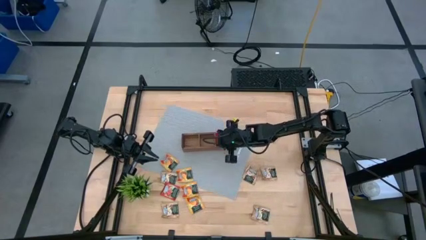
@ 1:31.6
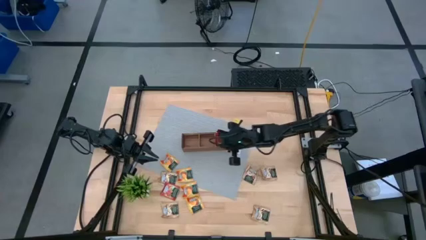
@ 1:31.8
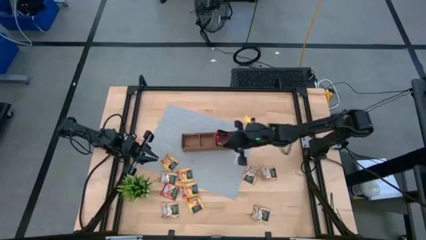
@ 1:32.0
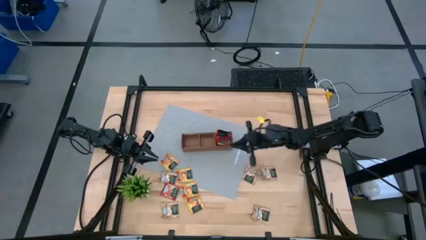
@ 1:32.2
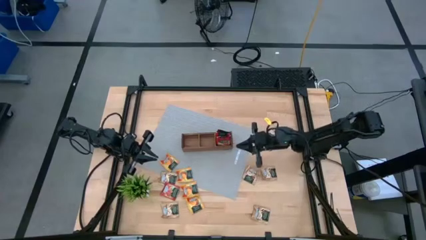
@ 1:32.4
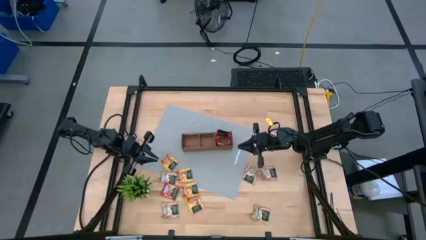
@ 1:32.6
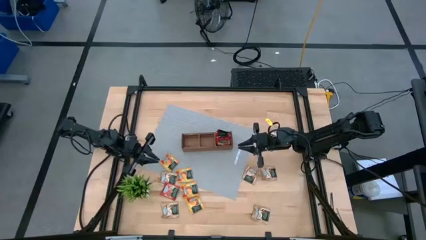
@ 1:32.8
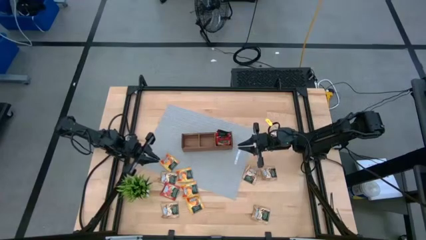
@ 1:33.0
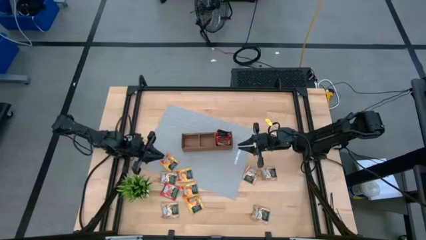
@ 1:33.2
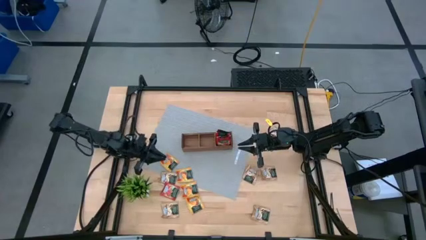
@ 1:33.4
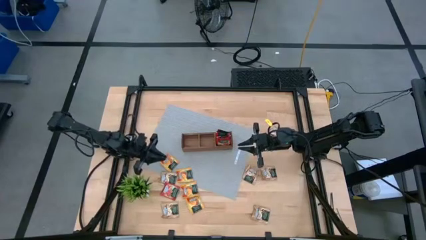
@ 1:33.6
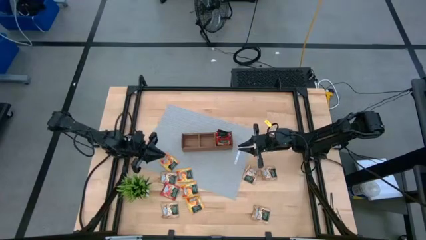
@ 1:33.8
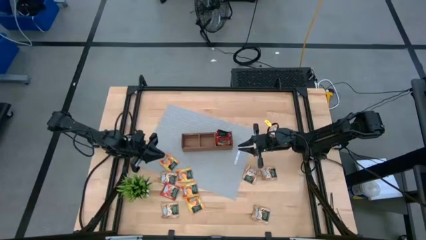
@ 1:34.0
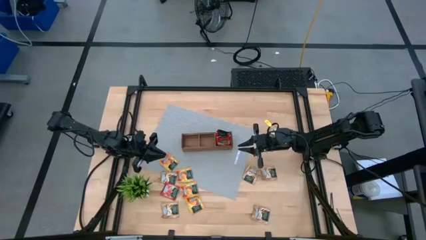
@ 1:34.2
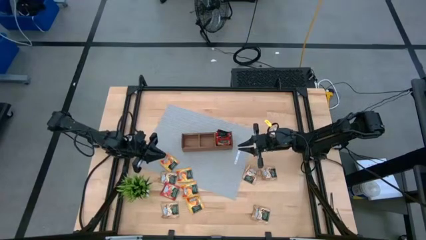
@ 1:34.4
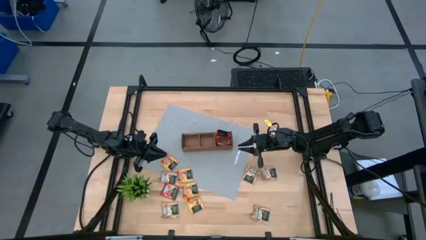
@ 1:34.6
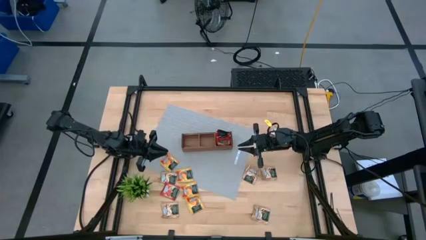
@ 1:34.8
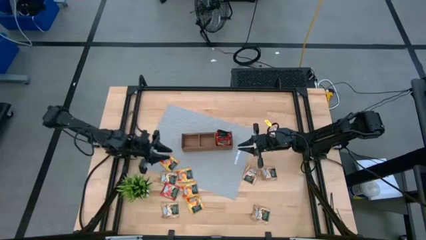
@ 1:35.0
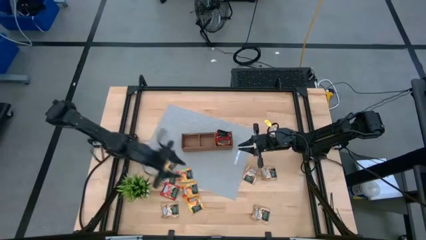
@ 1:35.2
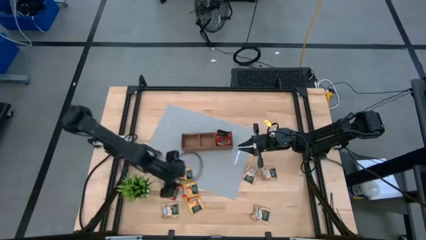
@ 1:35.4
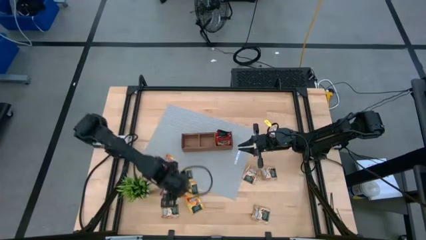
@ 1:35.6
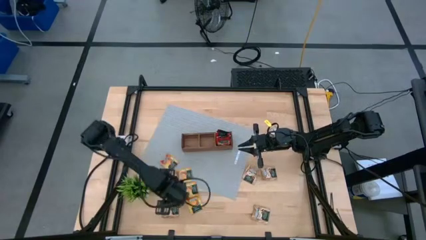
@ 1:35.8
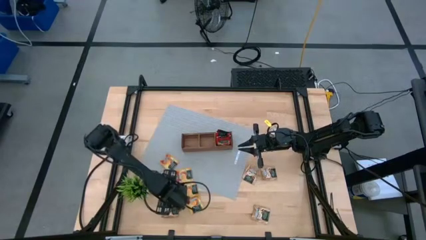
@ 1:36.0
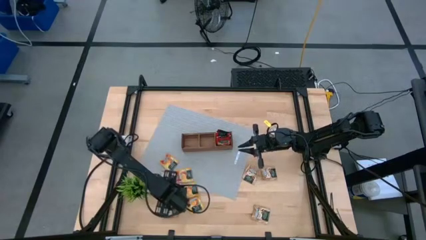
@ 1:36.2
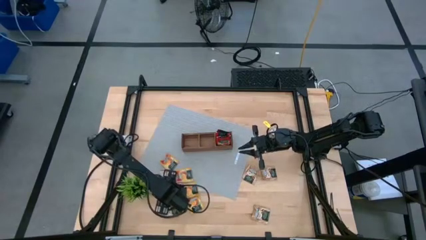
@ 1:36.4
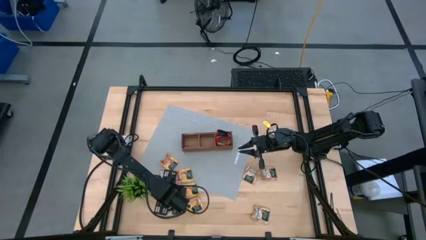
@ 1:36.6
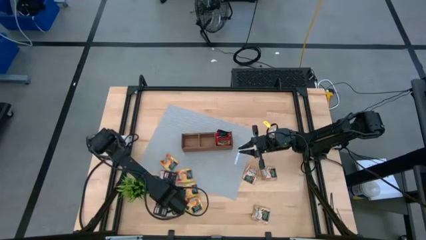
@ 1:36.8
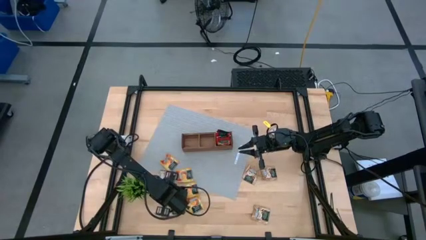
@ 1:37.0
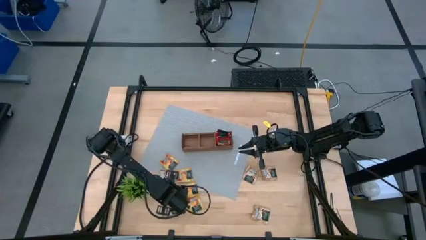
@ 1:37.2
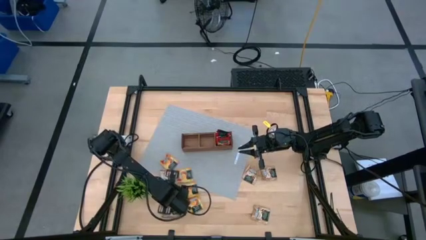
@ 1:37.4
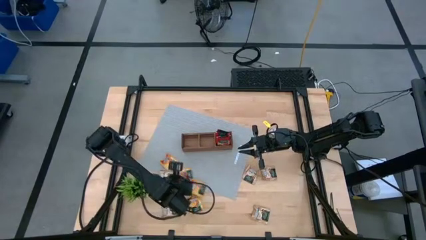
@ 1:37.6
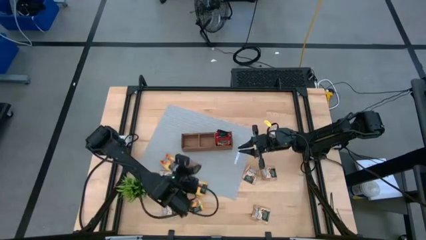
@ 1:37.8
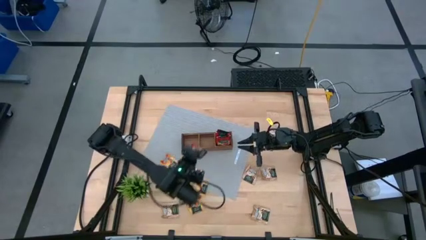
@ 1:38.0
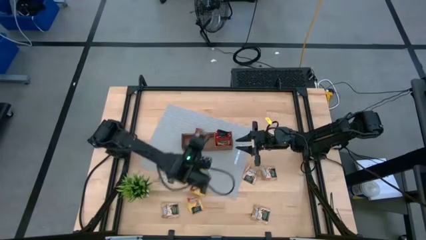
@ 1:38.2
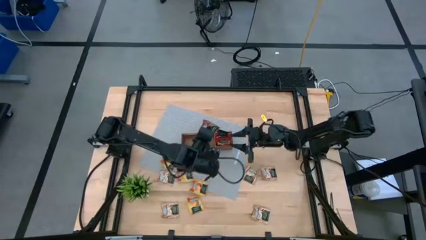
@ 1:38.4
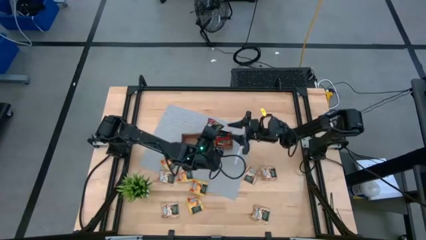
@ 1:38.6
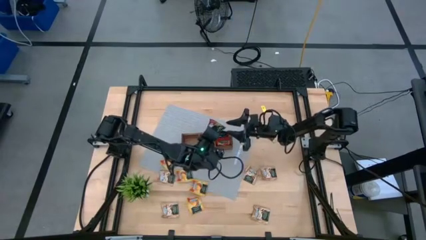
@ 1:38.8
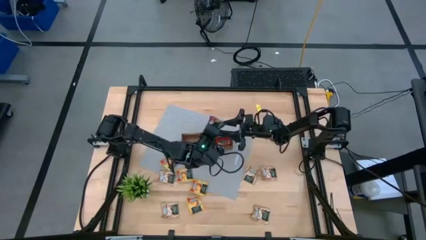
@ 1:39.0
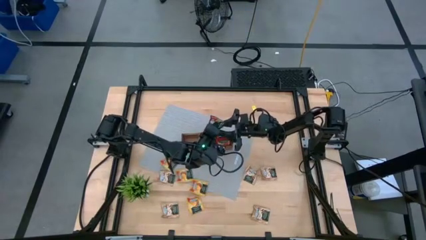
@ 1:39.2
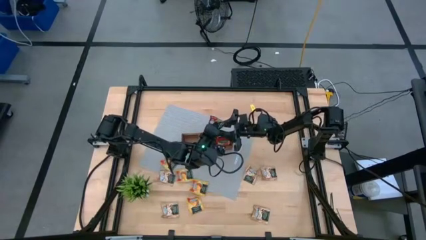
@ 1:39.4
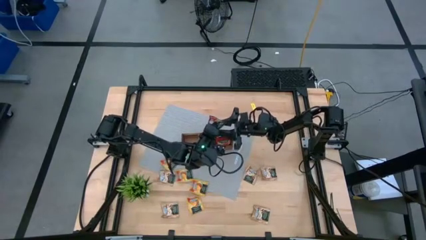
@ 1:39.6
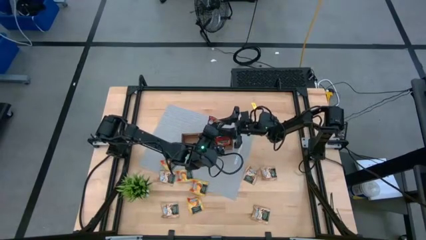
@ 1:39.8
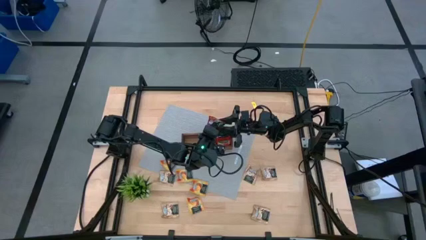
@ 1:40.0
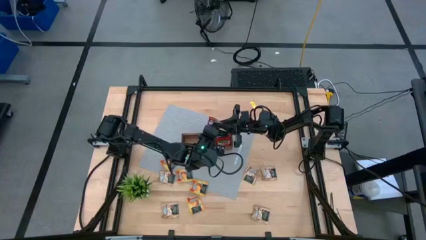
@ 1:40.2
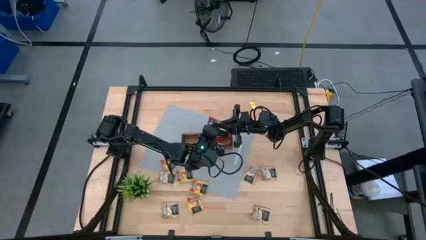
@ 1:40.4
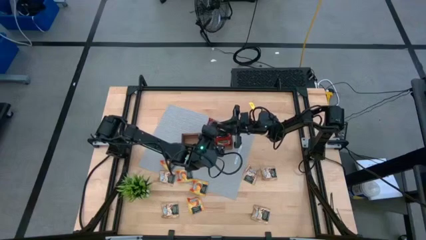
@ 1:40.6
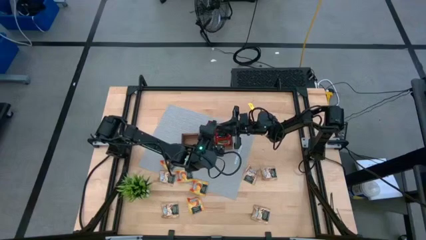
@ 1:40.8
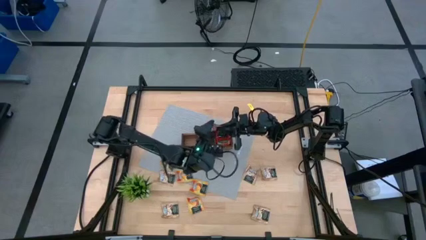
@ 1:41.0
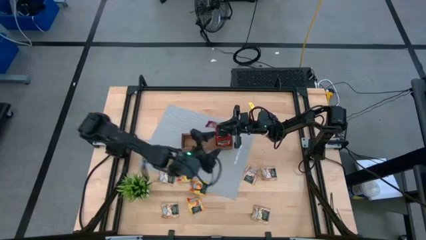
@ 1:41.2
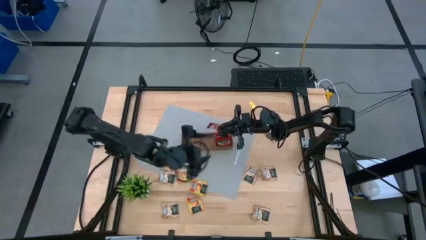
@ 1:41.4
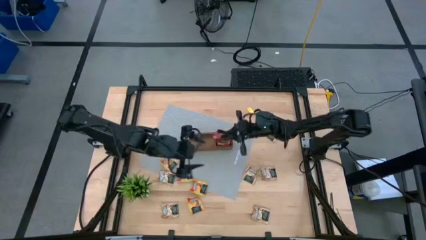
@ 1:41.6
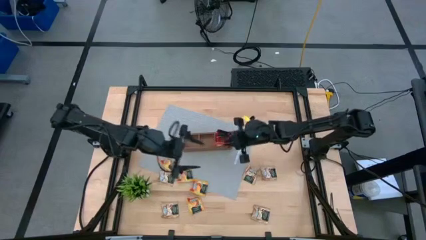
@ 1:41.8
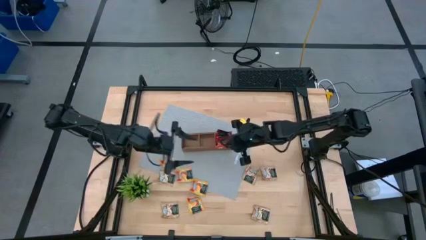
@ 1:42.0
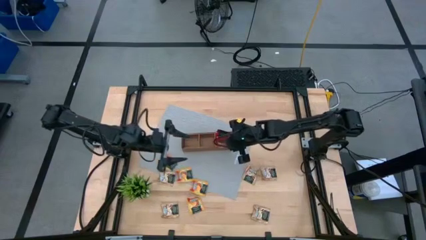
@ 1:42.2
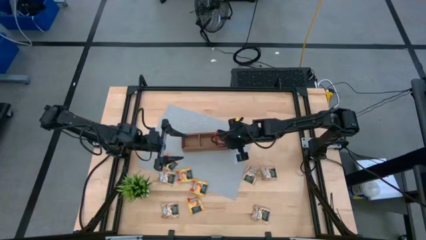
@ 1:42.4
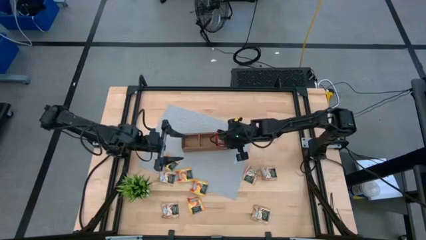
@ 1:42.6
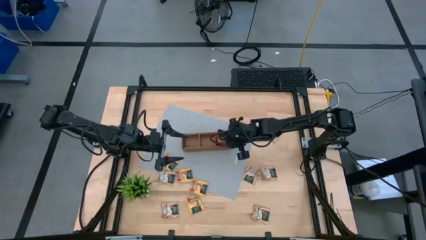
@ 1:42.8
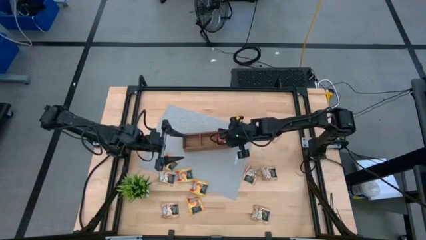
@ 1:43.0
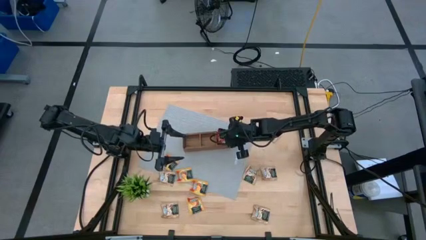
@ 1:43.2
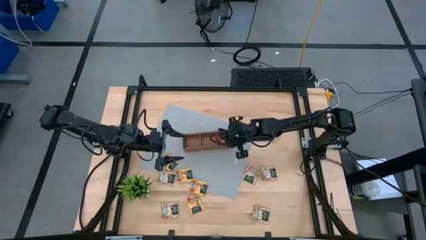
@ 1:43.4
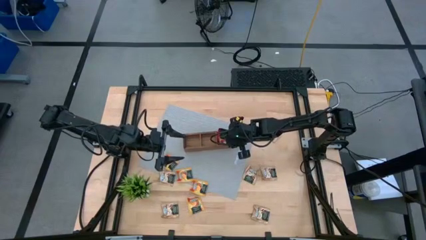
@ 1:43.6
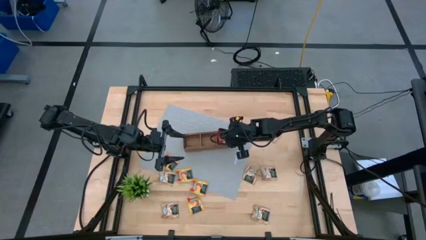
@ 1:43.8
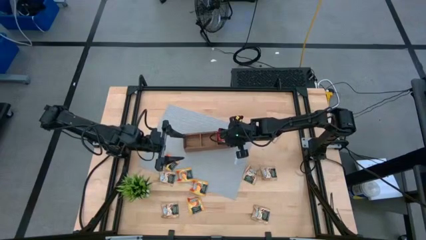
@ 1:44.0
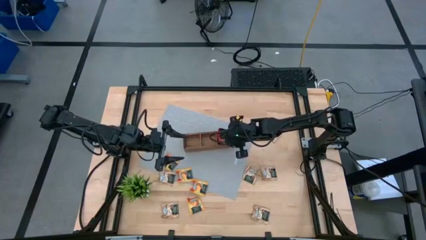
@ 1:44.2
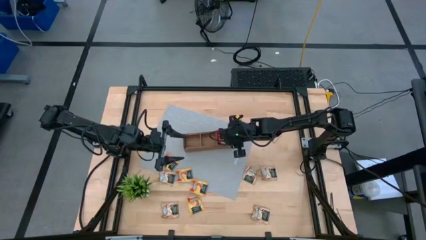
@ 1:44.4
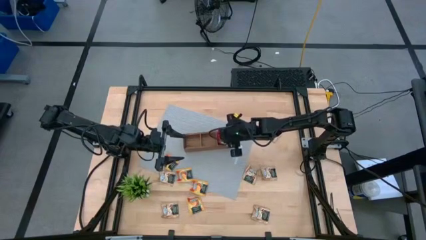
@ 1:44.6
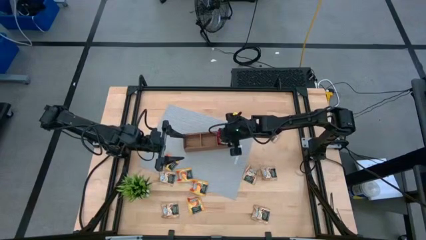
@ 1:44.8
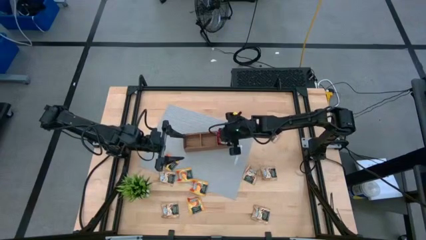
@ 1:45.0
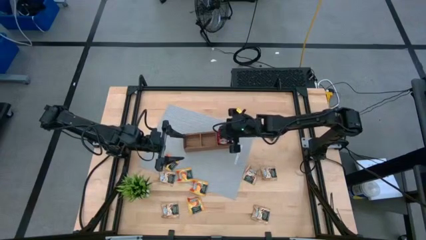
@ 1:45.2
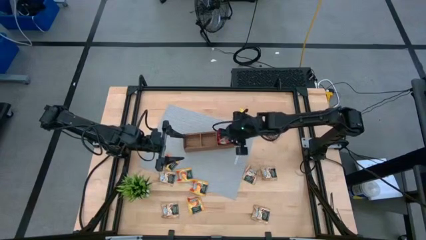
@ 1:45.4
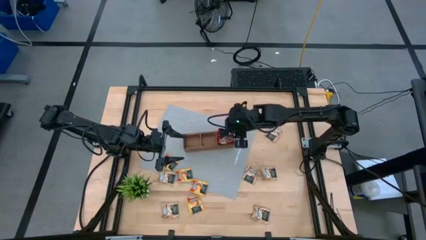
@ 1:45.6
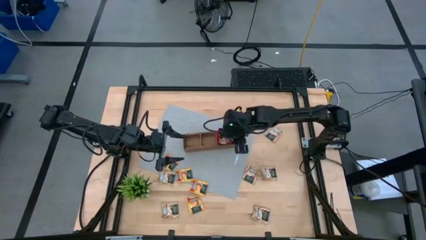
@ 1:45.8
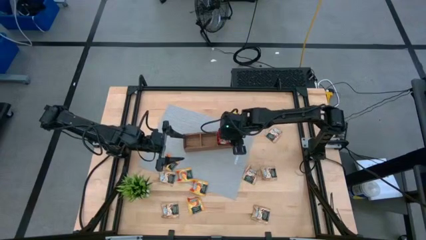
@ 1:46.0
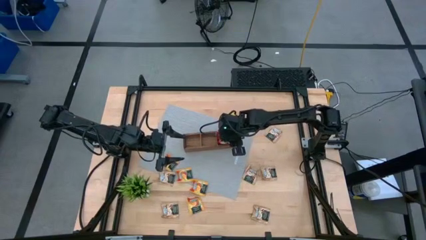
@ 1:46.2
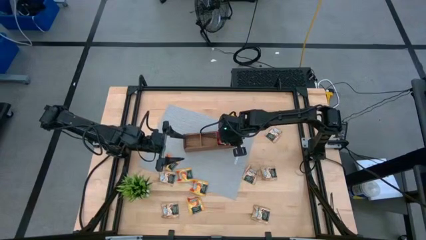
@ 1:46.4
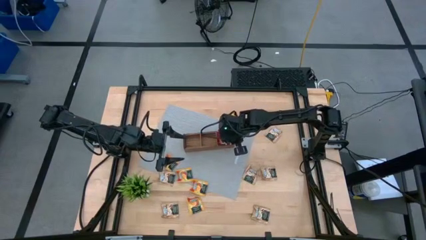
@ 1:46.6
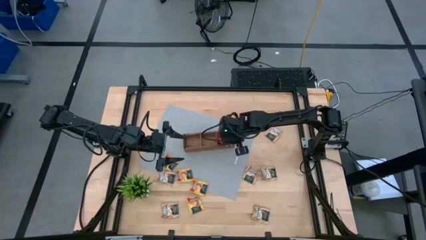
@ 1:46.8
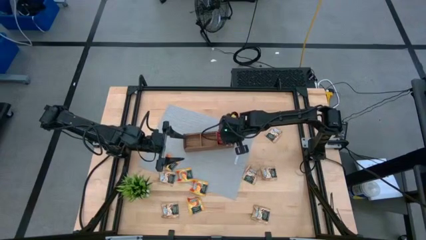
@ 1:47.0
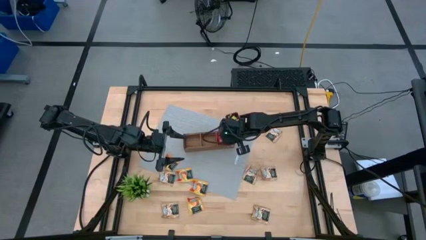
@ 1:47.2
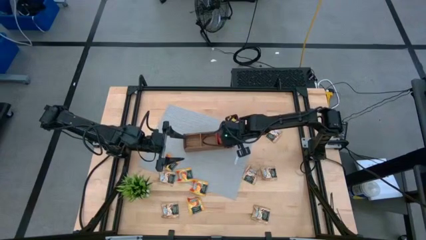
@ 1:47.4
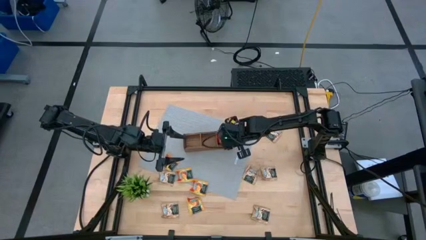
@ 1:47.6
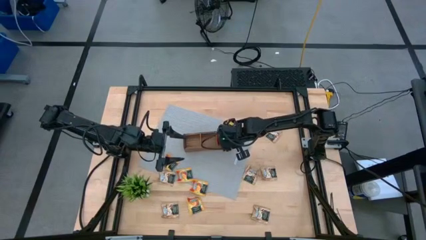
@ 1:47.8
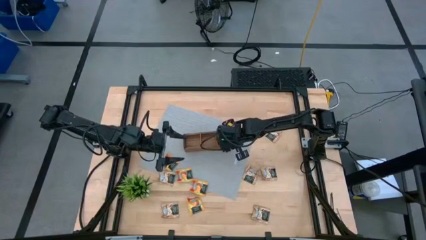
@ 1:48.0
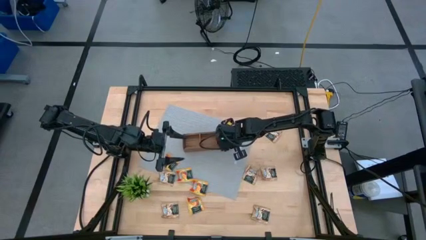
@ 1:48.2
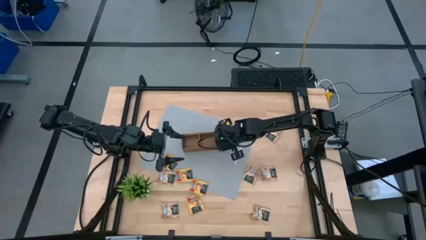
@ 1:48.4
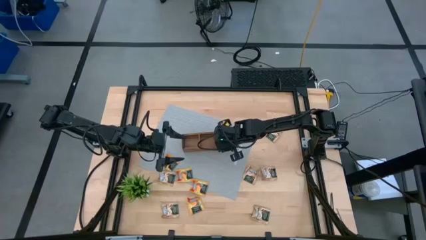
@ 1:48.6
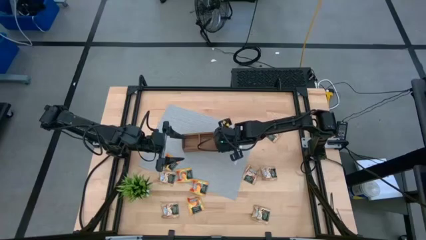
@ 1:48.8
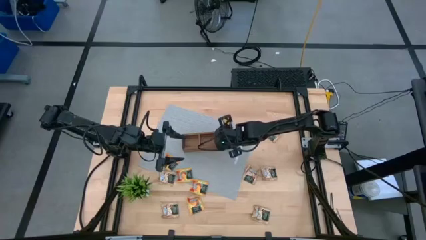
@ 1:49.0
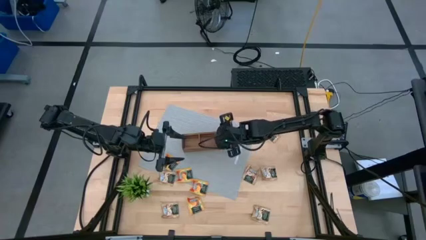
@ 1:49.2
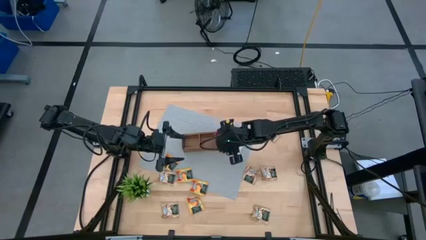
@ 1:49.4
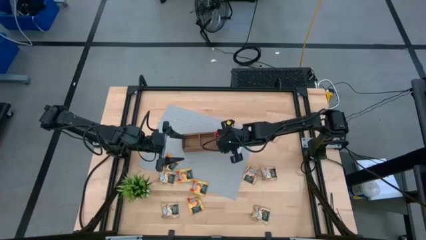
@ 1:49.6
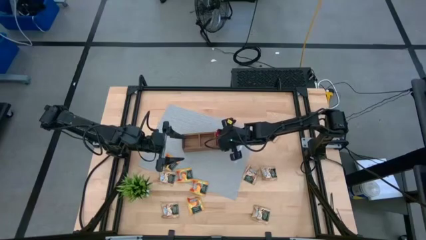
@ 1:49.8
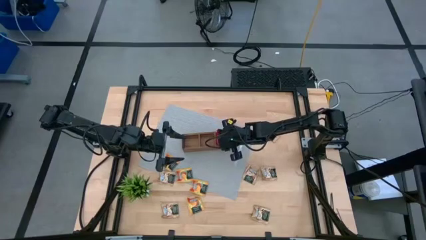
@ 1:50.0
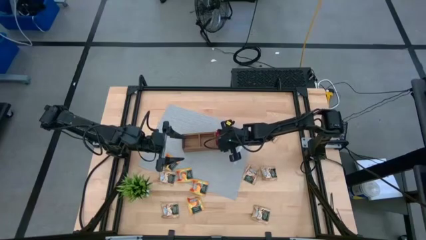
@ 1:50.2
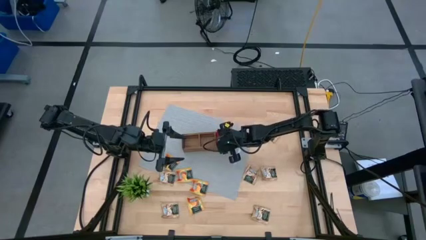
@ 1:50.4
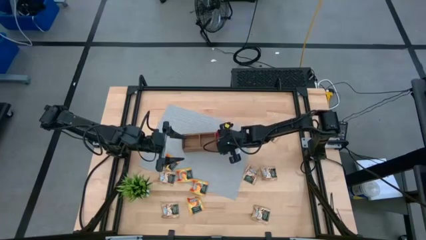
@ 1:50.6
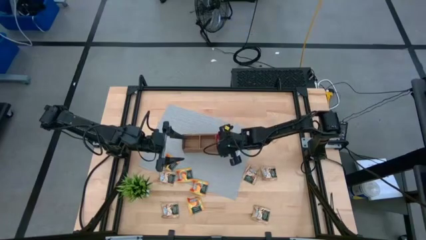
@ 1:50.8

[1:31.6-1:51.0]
Task: Pick & Place Tea
Put the red tea bag into the wooden organizer
